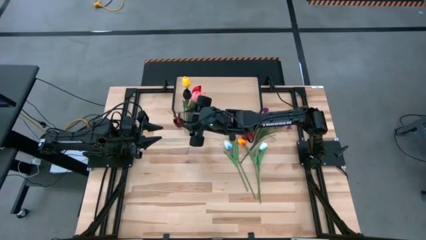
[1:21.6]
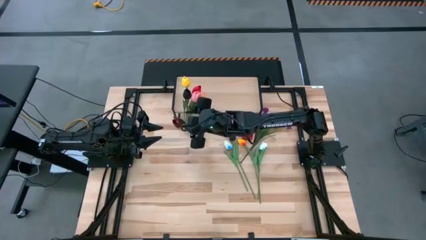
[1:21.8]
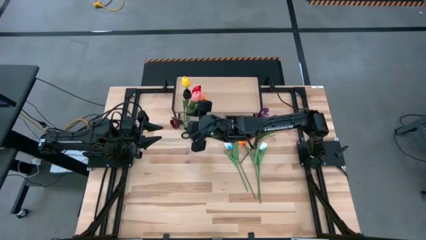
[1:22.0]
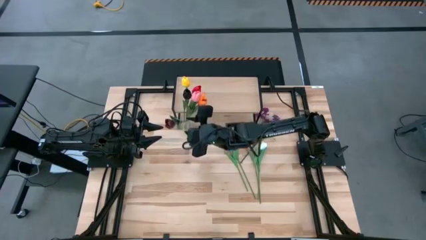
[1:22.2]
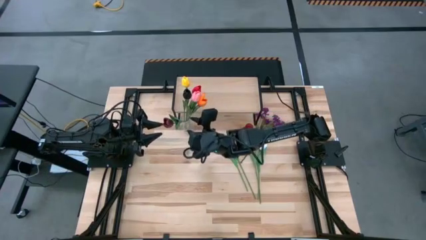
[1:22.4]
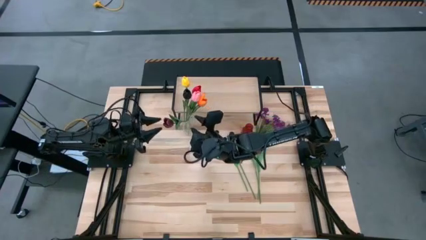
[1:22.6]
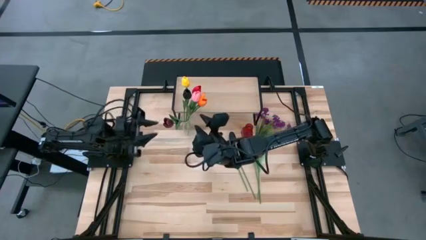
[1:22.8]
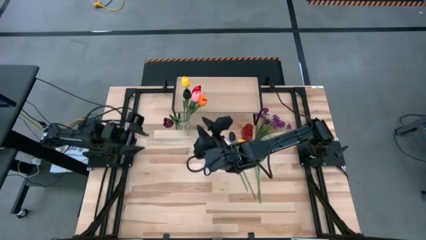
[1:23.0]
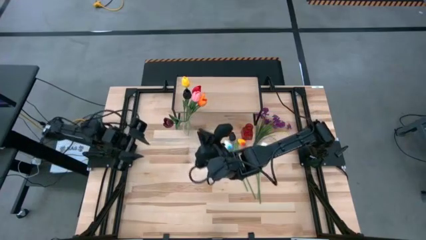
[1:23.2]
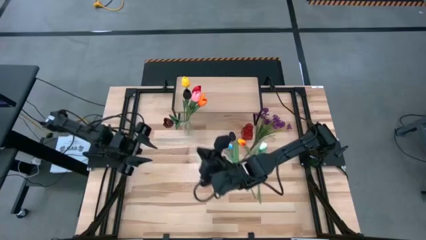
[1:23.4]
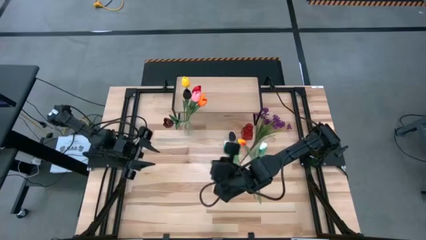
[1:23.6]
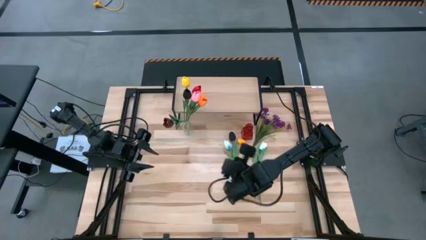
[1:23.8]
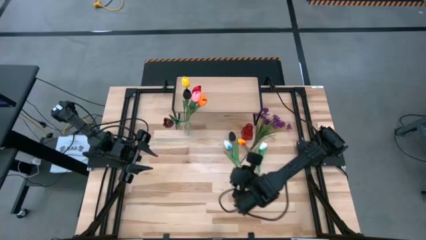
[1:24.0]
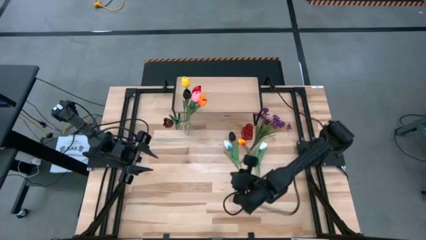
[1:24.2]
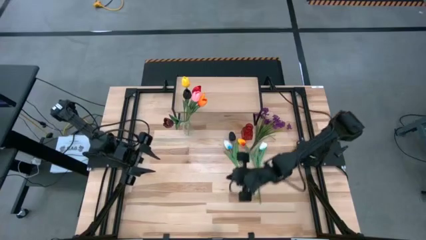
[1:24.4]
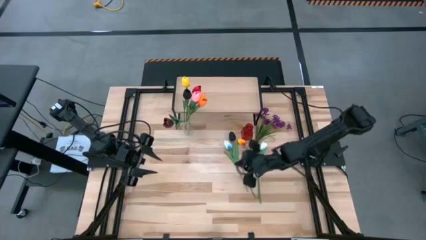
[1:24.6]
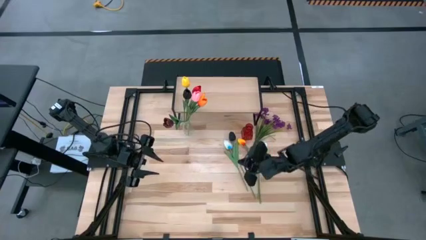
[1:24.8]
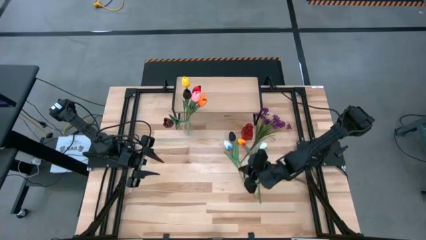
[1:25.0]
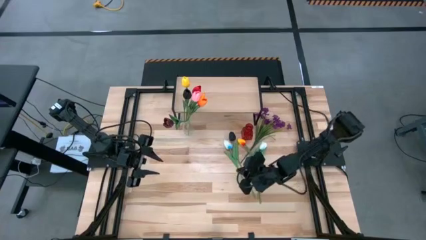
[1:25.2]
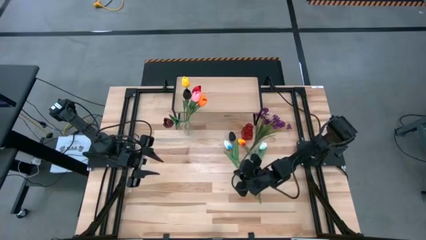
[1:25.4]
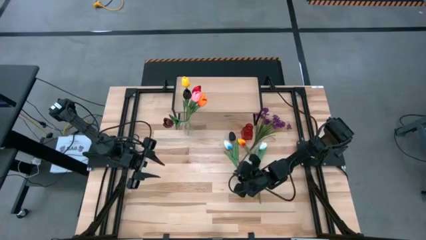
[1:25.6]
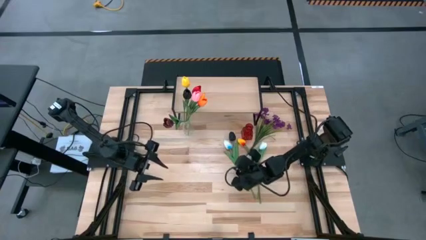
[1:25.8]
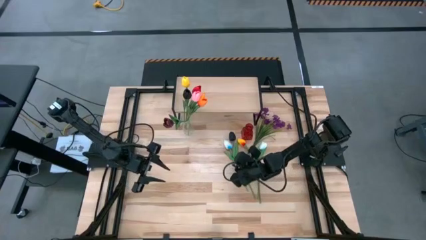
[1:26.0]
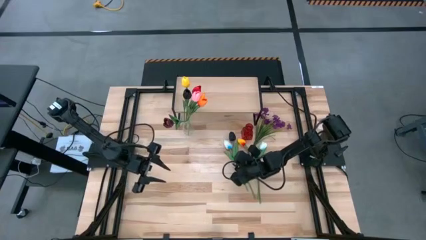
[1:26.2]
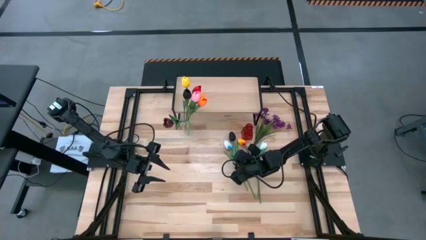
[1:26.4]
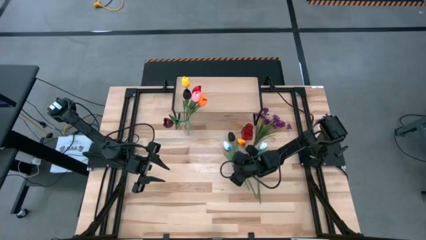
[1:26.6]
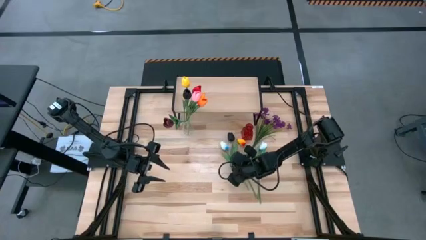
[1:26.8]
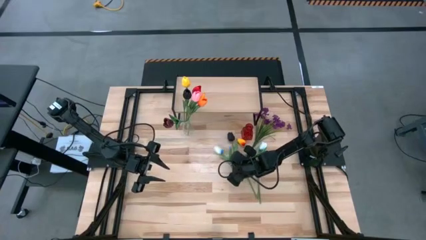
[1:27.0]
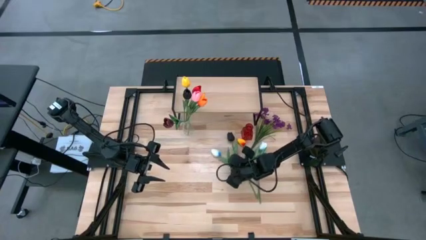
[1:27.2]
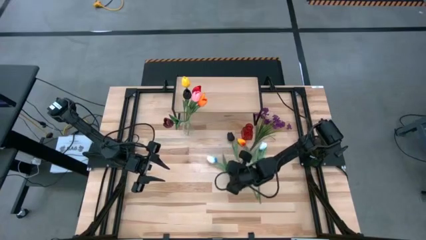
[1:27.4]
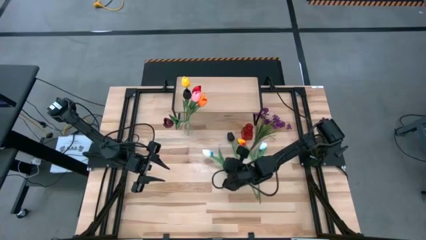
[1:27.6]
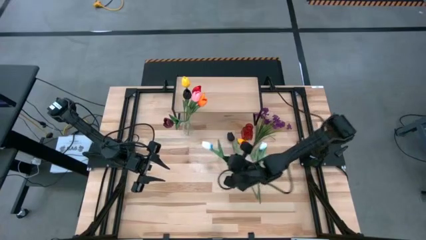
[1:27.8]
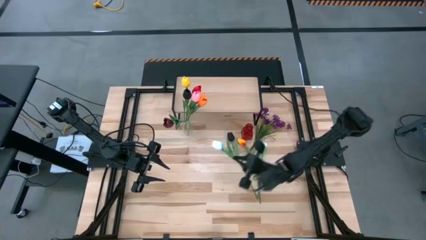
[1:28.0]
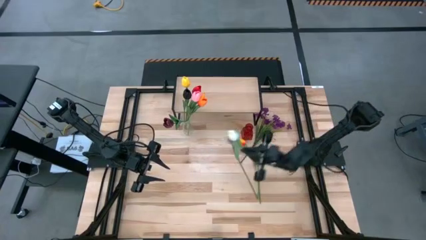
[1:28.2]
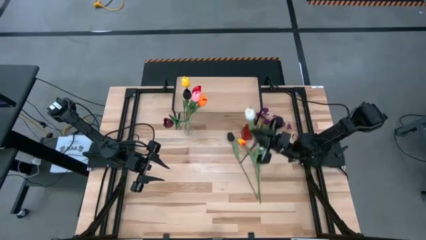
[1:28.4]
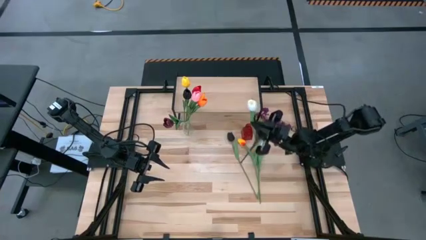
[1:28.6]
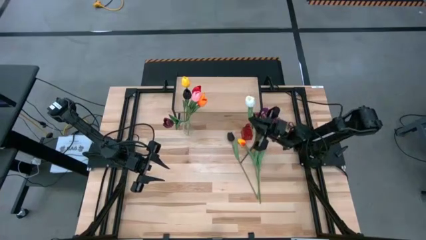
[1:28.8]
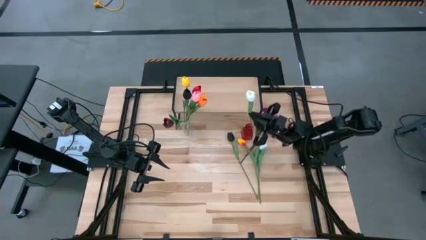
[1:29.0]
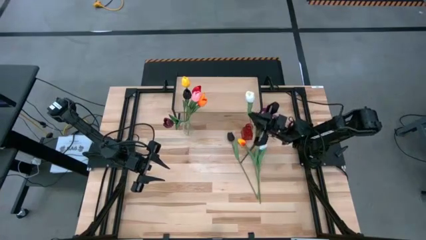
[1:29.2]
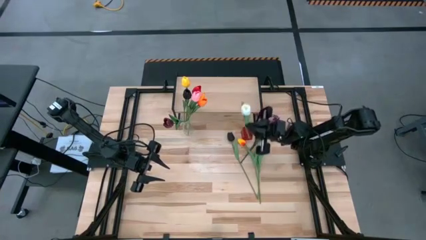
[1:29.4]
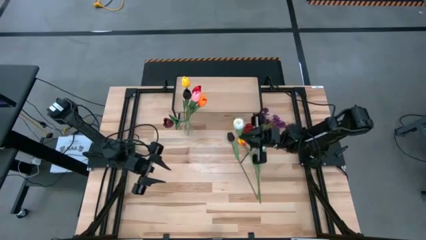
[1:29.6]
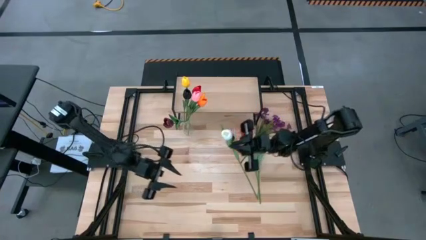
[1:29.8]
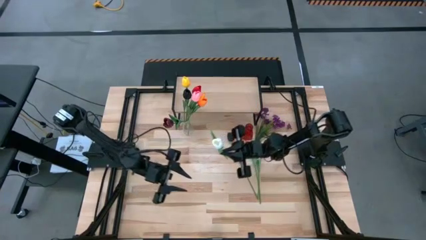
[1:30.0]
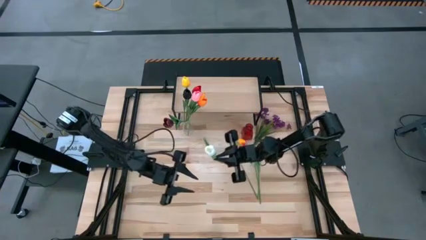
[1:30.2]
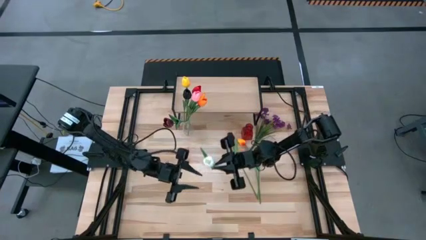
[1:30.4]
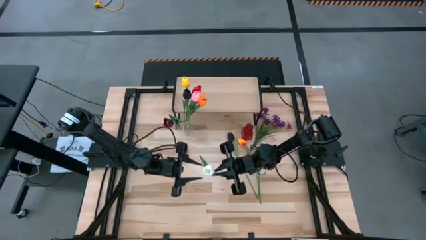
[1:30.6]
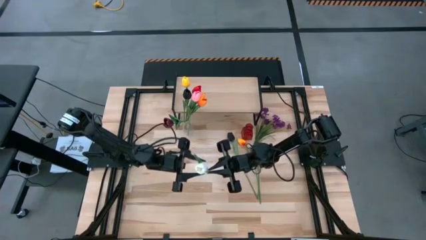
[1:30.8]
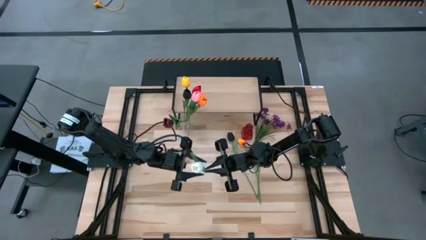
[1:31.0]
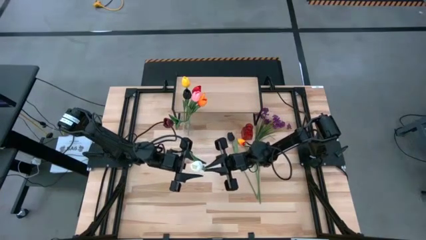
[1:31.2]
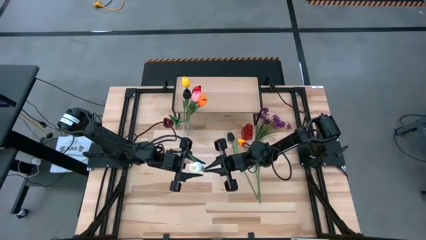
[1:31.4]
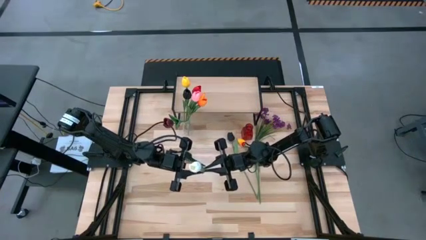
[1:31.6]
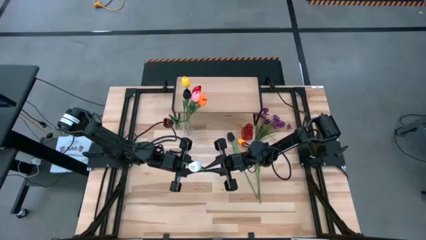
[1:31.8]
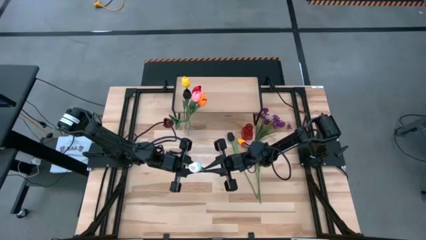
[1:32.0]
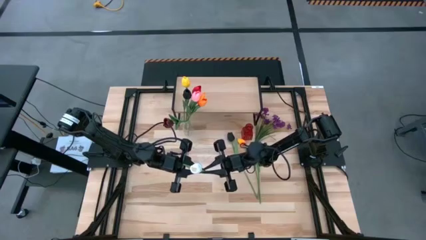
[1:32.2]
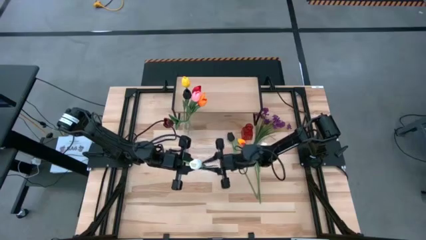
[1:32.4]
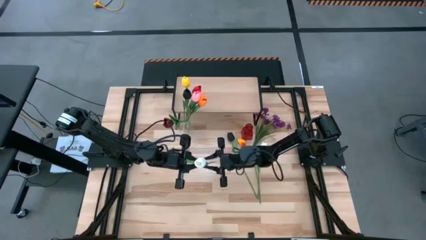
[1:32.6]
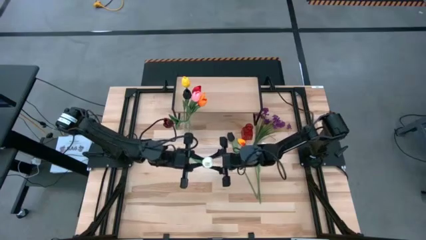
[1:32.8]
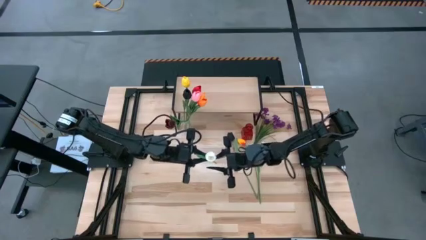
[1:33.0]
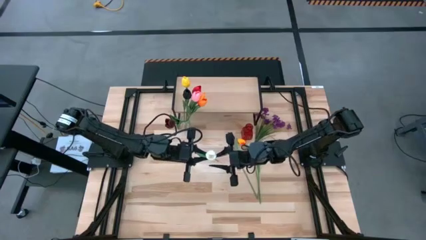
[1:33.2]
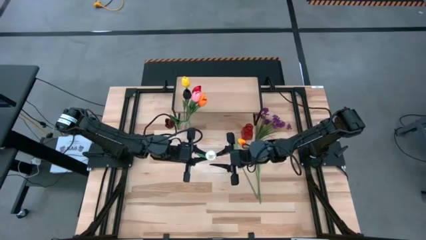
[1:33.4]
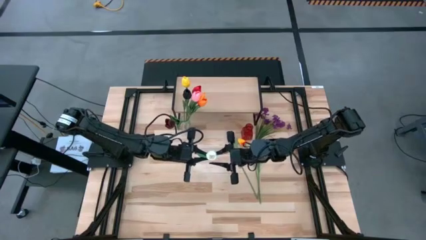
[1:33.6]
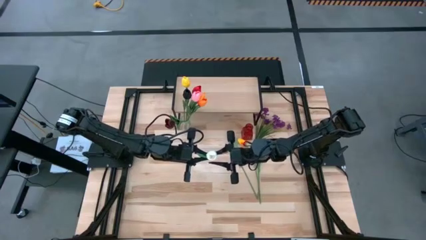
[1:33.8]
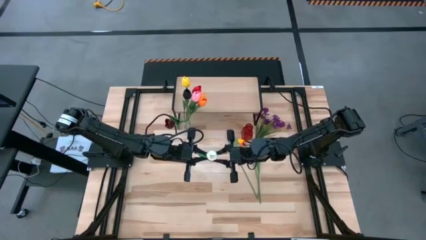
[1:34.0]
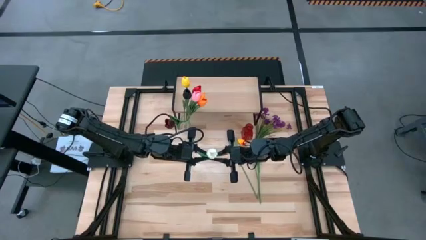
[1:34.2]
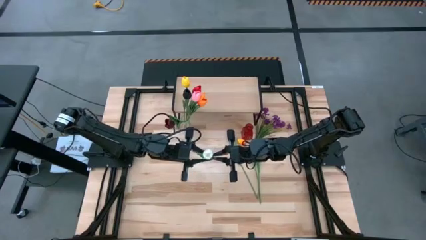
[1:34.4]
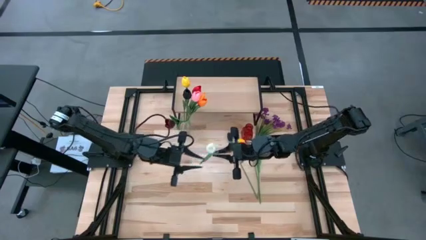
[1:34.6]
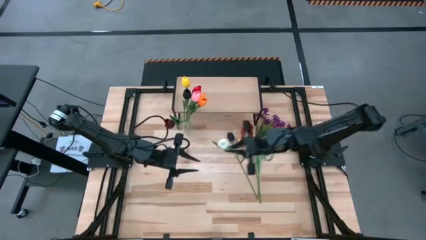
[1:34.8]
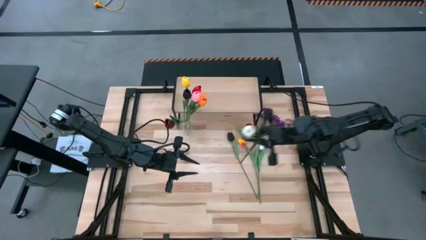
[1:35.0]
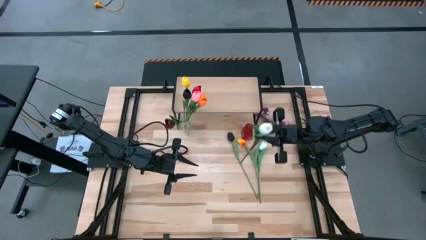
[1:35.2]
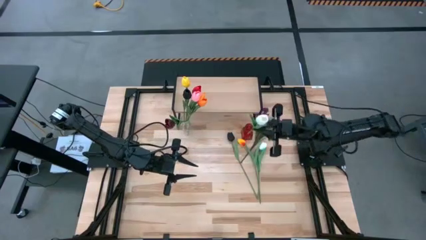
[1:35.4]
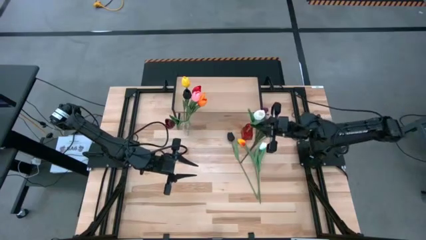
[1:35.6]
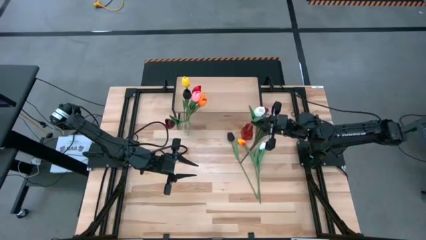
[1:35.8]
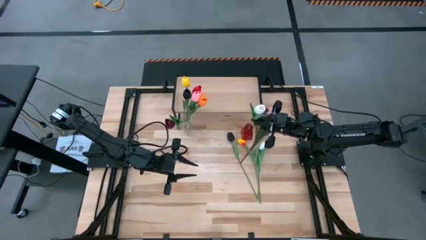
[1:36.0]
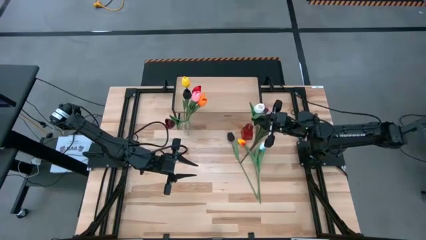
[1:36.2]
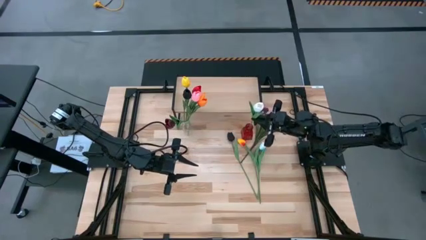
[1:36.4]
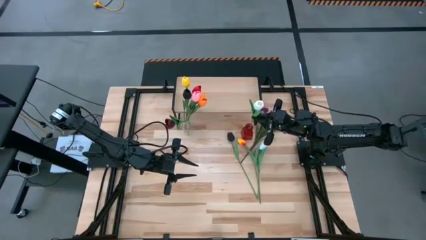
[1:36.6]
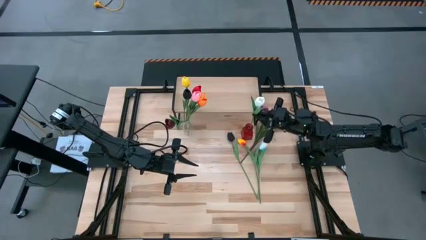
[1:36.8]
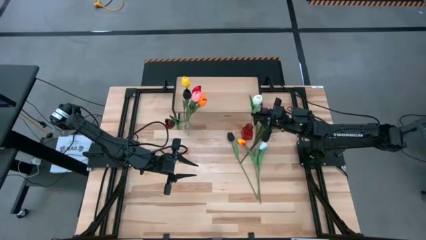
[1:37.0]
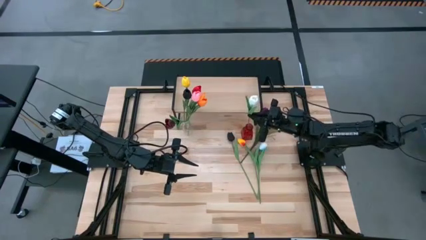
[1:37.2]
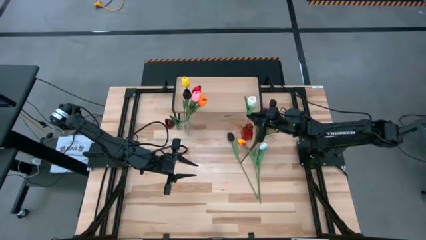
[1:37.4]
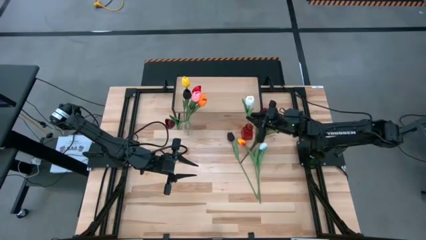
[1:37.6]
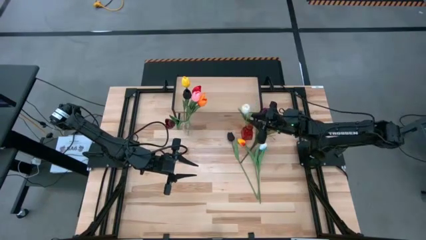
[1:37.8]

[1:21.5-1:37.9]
Task: Pick and place flowers into a vace then onto a shelf
Put the left white flower into the red vase

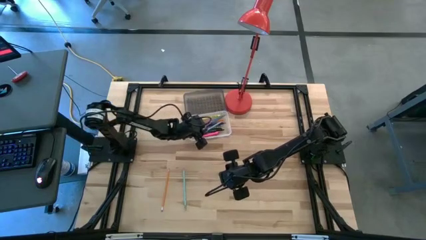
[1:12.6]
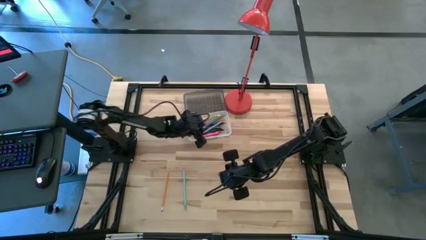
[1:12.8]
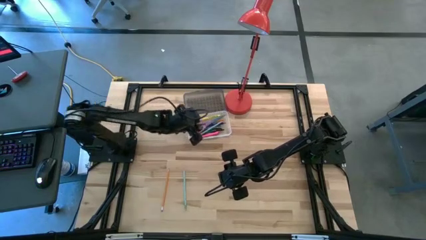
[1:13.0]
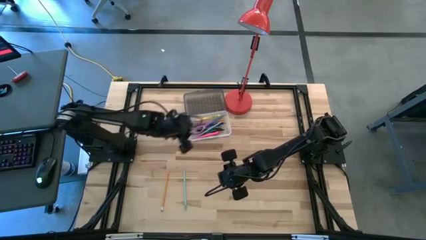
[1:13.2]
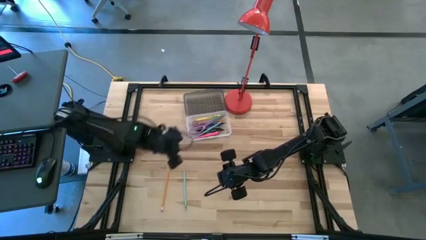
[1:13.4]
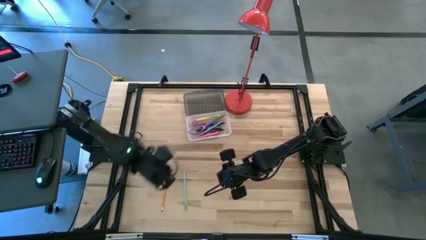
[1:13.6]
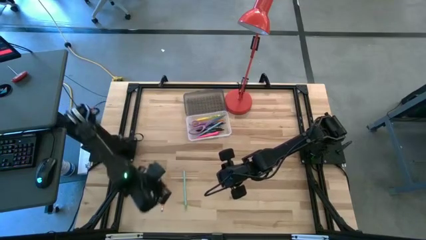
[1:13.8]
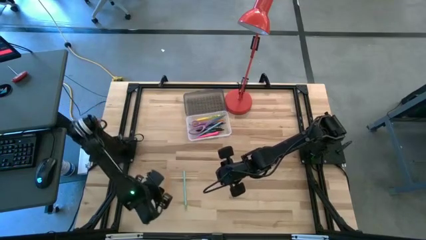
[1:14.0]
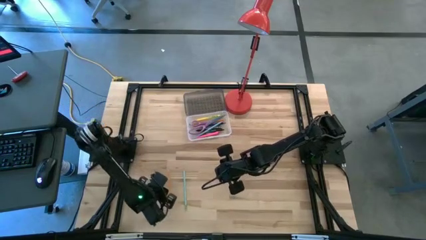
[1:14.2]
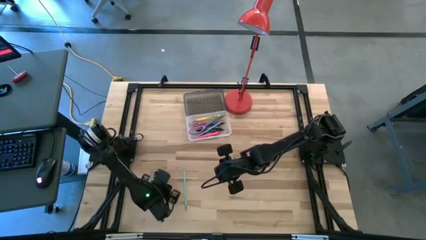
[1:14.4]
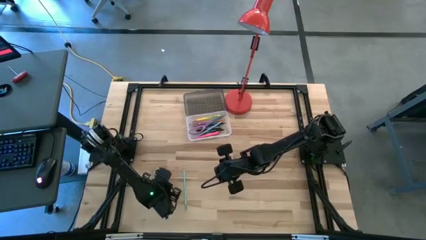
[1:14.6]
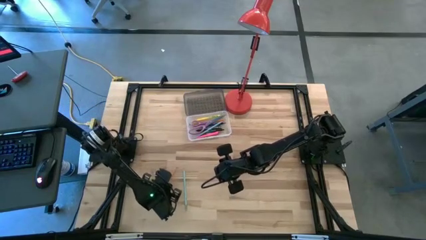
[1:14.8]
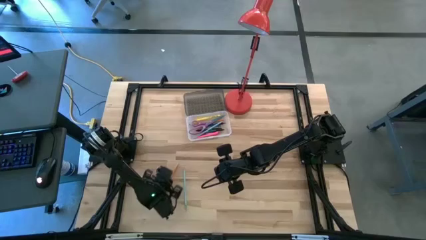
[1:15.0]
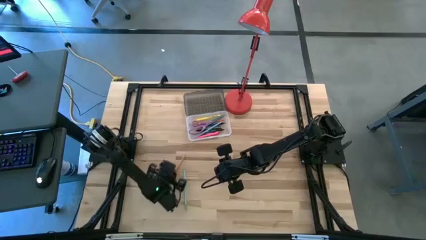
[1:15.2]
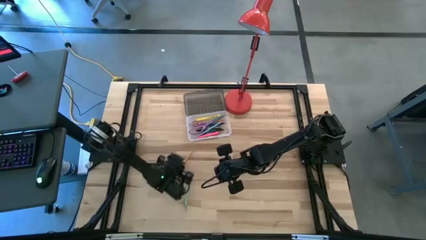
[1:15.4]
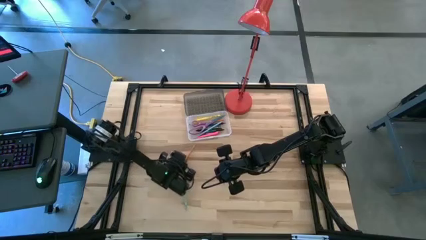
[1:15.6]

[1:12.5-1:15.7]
Task: Pick & place school supplies into a supply box
Put the orange pencil into the black supply box
